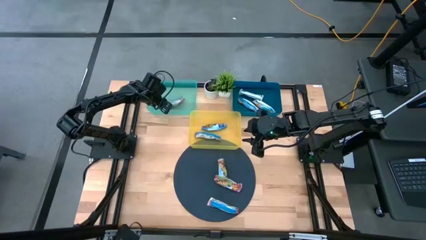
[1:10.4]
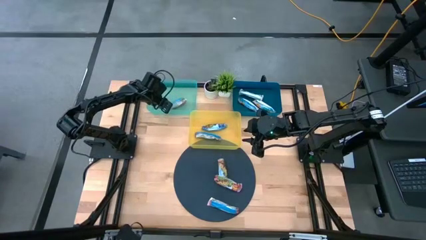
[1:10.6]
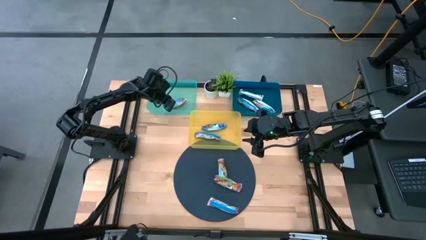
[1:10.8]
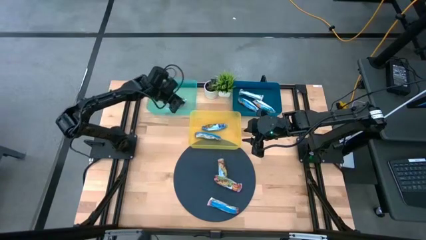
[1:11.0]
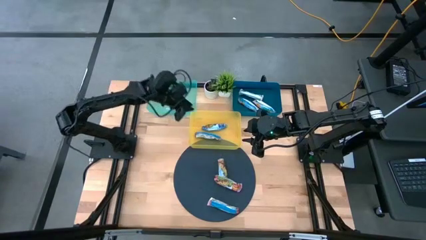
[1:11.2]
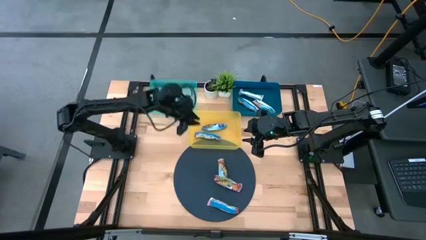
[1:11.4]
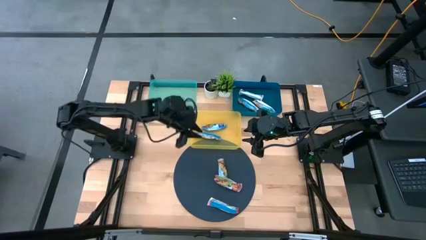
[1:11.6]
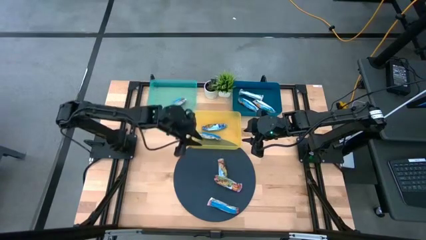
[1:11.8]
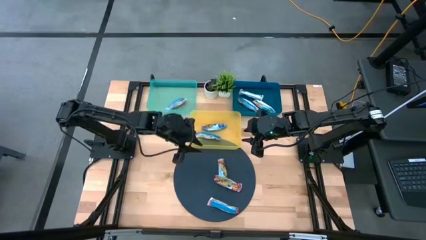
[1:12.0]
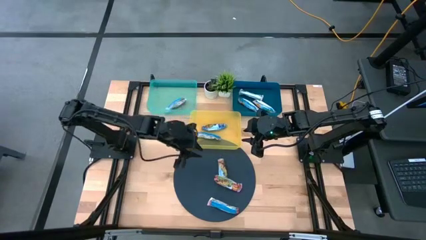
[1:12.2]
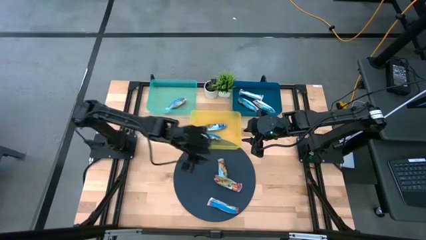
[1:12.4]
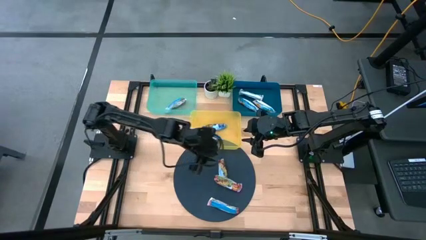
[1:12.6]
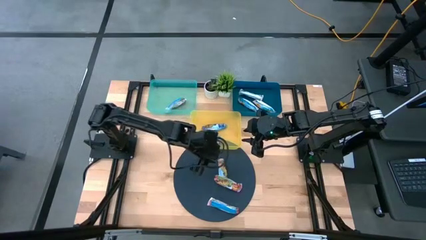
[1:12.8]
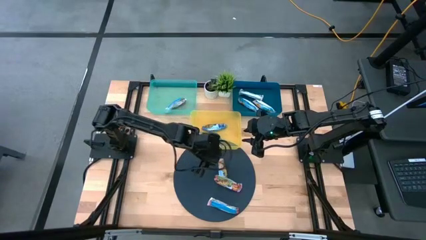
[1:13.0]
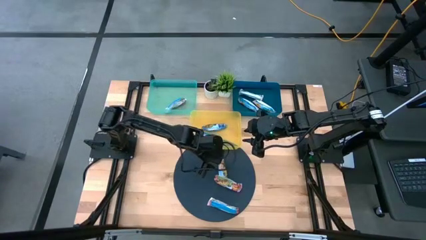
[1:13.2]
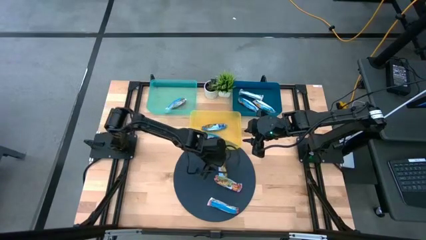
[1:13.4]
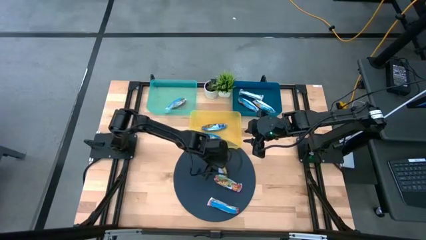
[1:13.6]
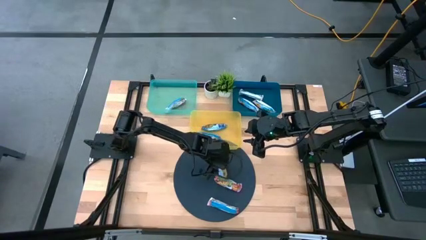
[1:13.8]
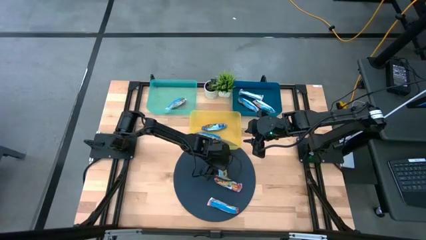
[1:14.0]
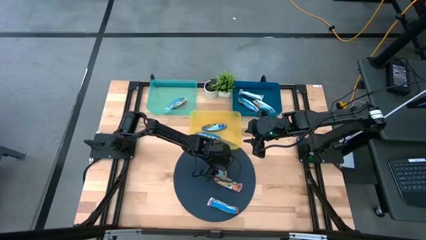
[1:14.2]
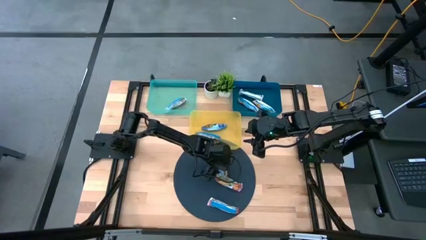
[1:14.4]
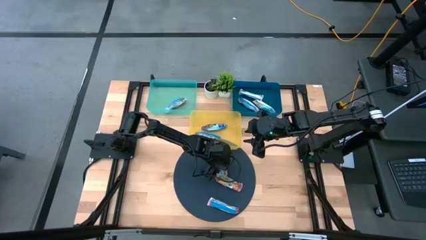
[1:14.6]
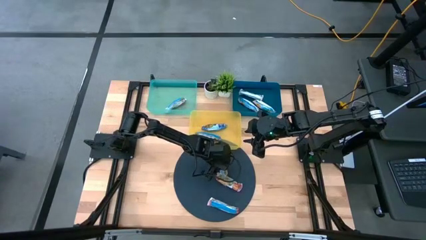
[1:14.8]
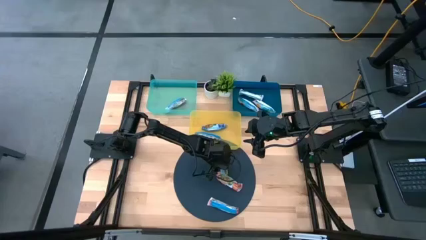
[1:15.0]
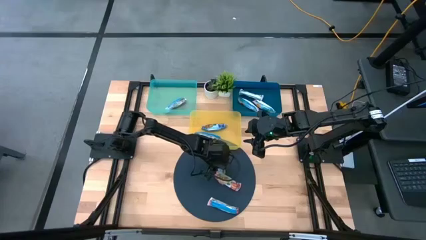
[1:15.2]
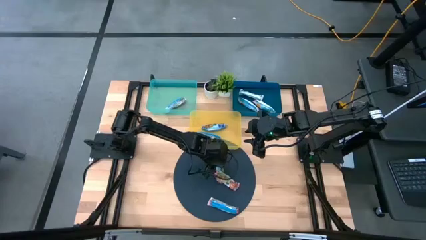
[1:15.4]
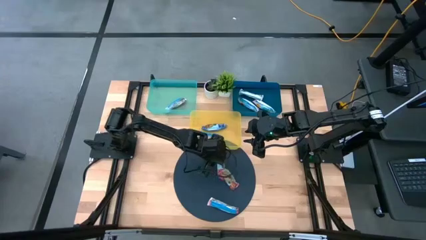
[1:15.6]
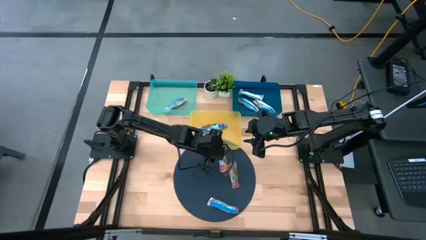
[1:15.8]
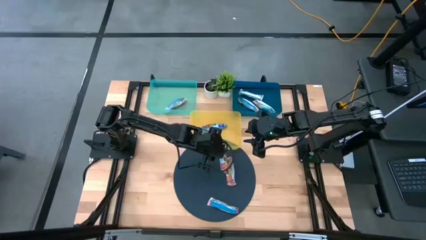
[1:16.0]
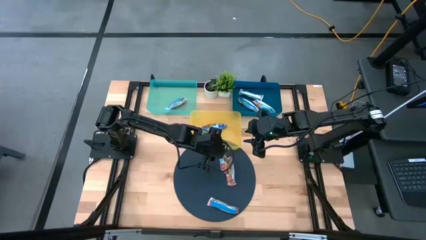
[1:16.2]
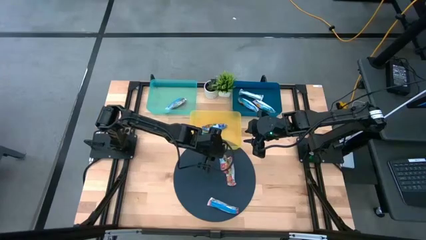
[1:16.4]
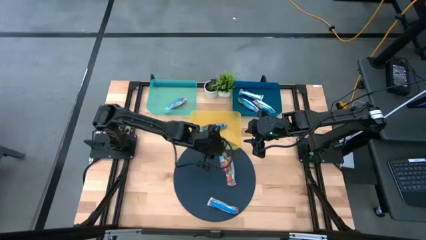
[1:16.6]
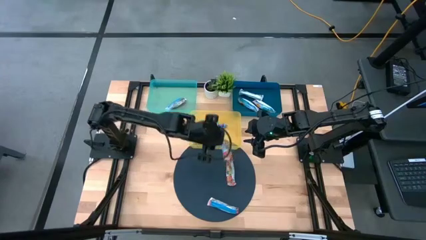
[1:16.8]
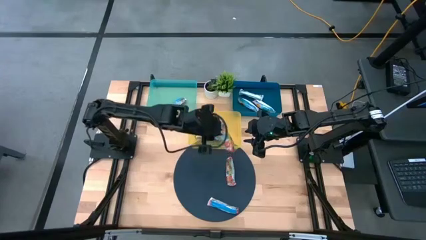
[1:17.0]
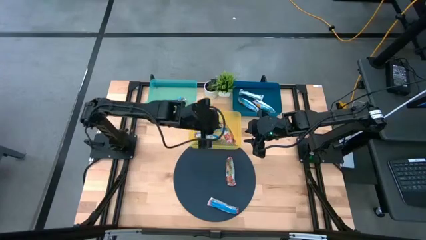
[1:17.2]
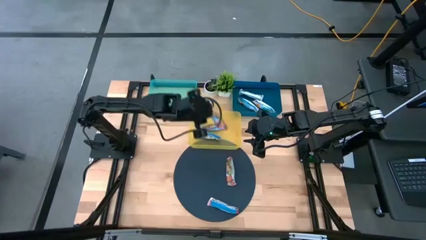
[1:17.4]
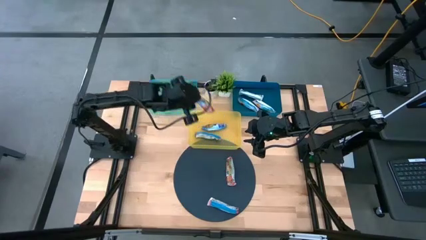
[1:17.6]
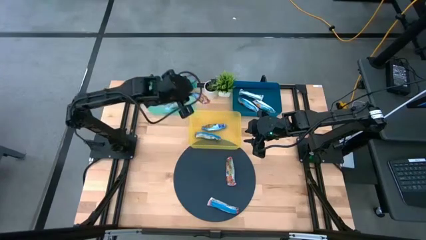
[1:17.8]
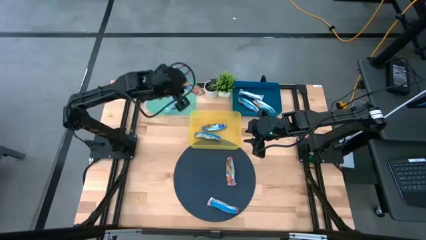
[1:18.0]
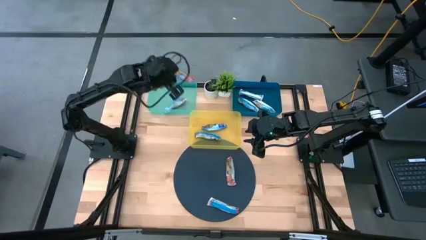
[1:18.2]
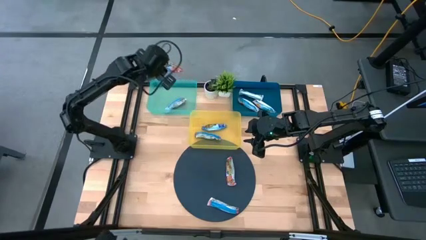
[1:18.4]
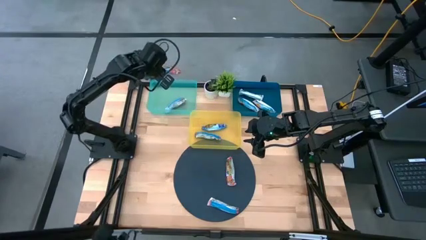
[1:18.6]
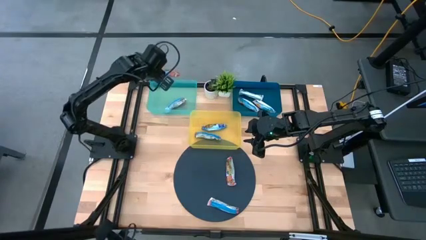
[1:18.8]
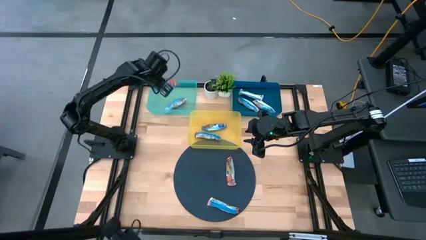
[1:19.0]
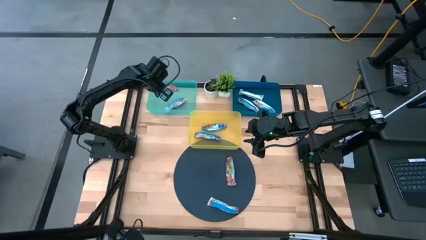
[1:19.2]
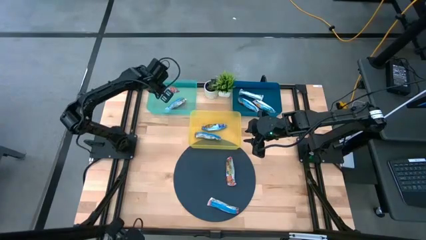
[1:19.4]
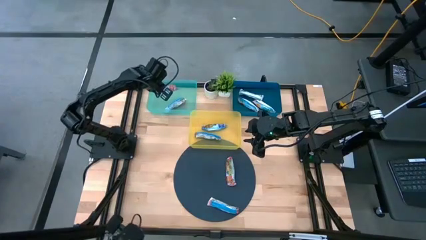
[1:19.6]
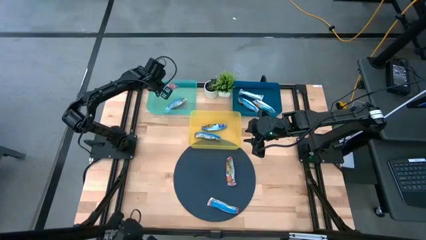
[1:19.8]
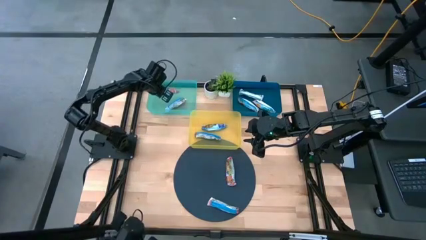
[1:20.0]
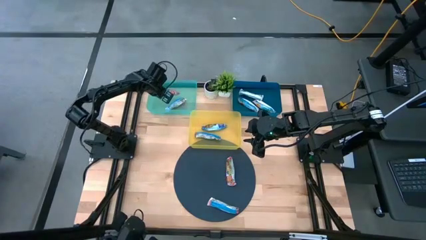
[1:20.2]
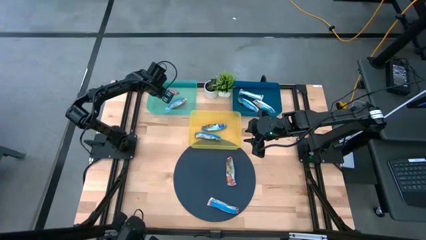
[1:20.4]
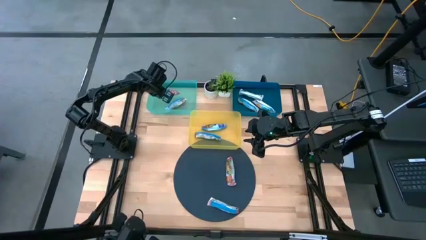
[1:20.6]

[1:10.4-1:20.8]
Task: Pick and place Granola Bars by type
Put the red granola bar into the green bin
